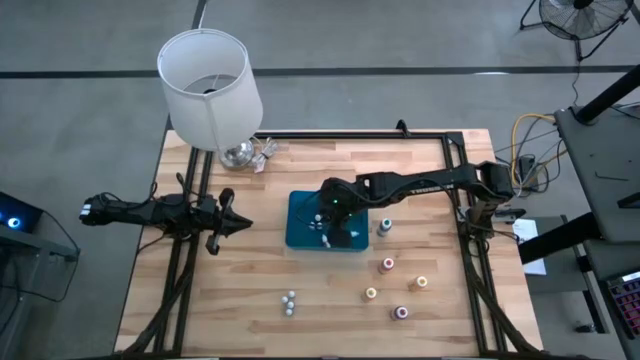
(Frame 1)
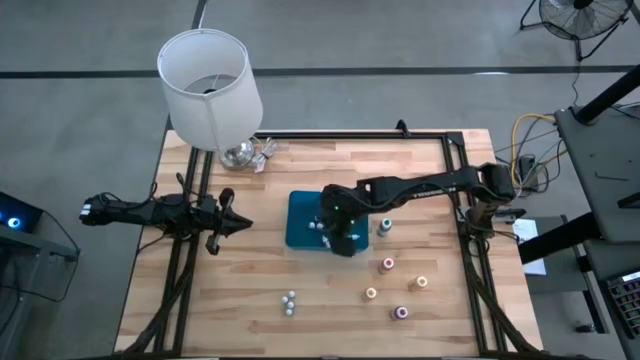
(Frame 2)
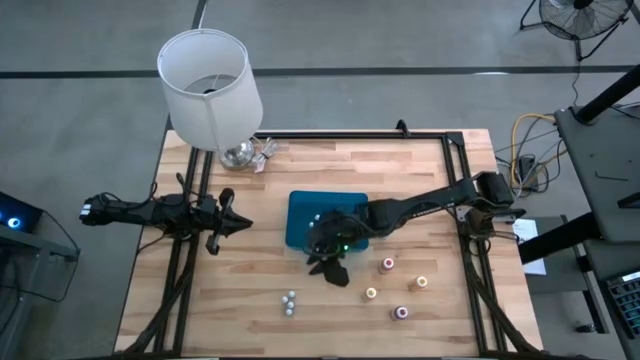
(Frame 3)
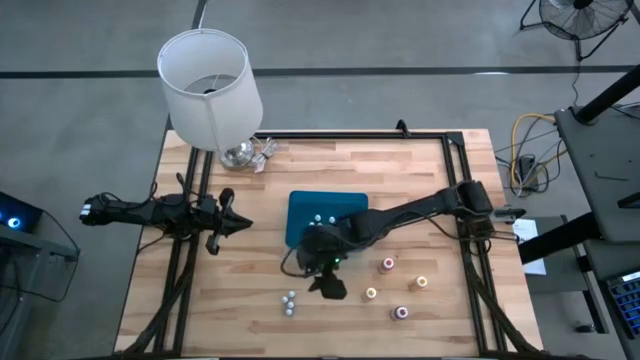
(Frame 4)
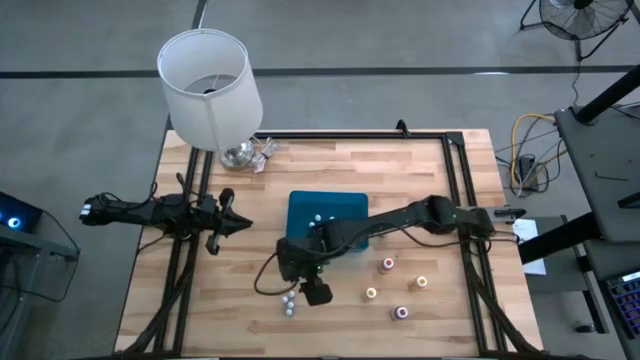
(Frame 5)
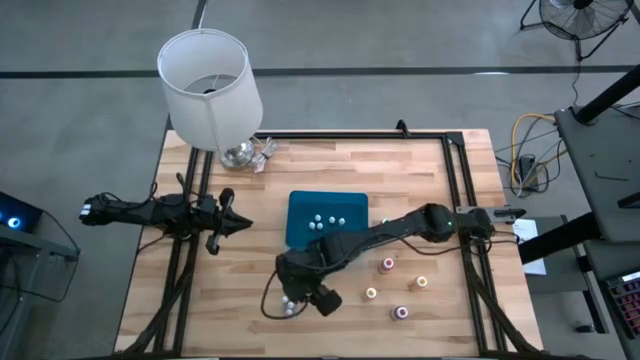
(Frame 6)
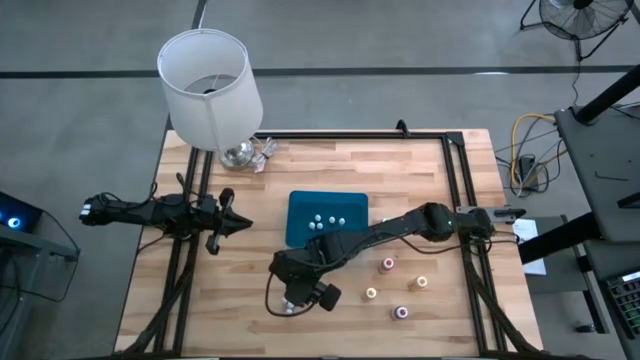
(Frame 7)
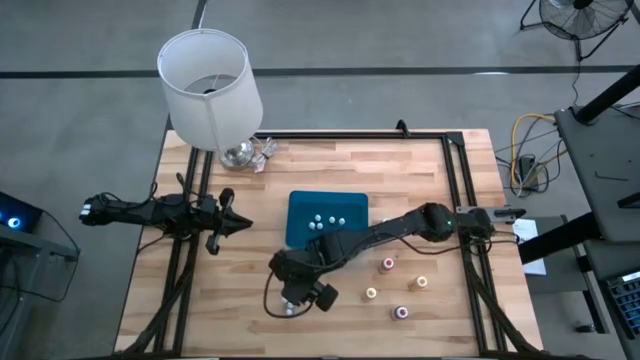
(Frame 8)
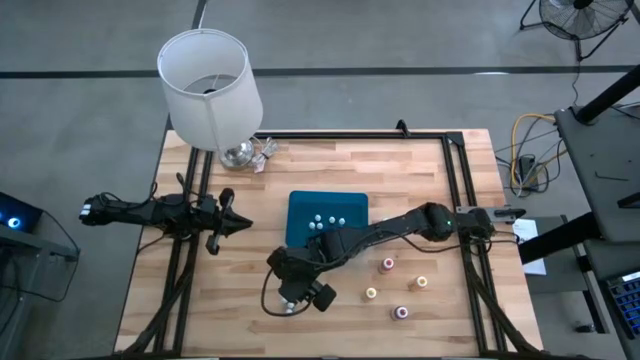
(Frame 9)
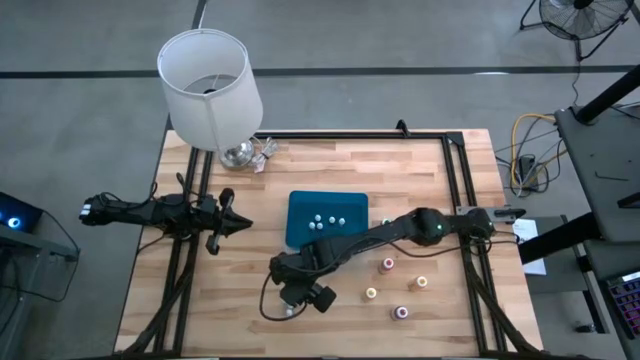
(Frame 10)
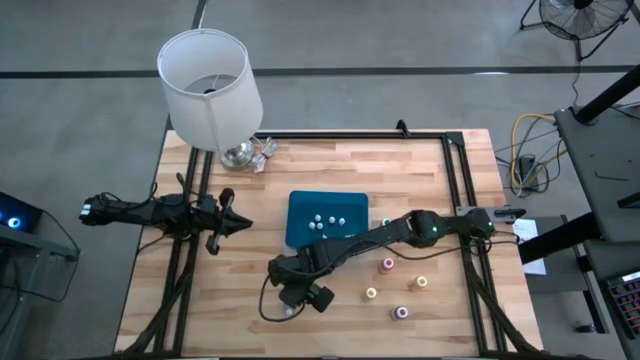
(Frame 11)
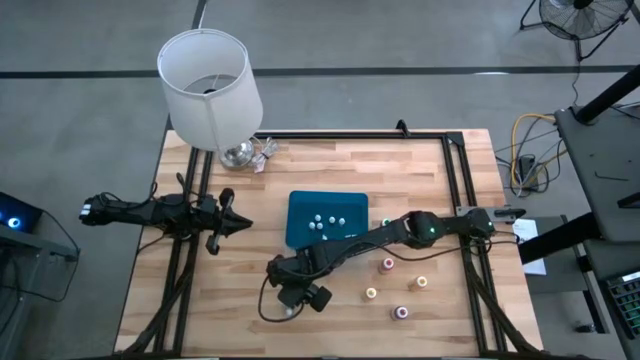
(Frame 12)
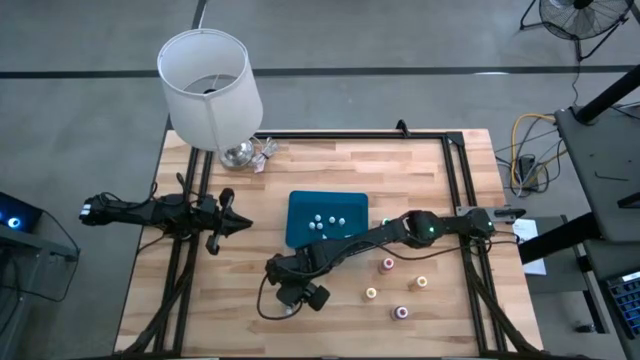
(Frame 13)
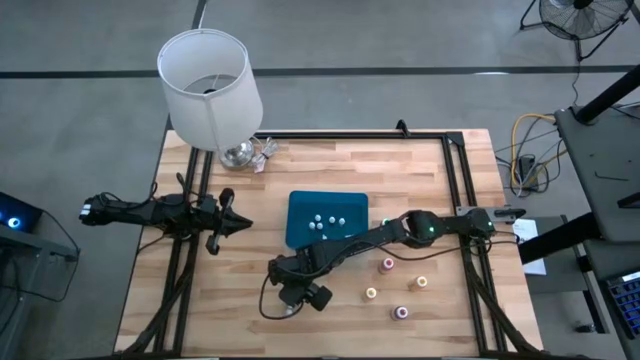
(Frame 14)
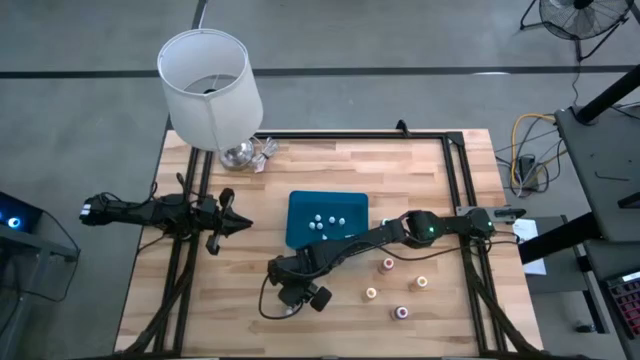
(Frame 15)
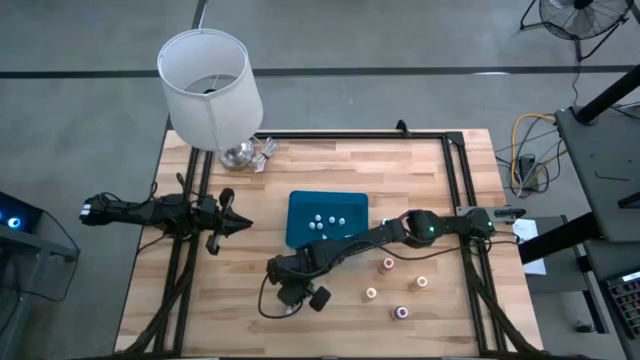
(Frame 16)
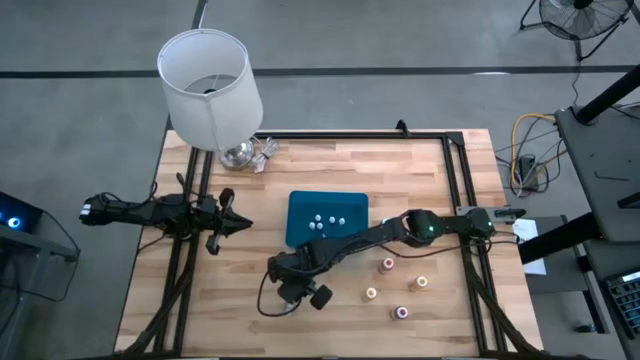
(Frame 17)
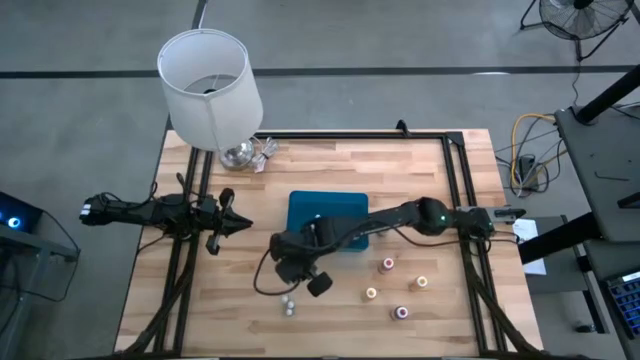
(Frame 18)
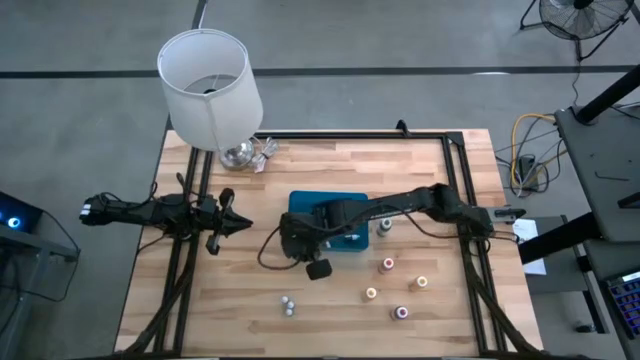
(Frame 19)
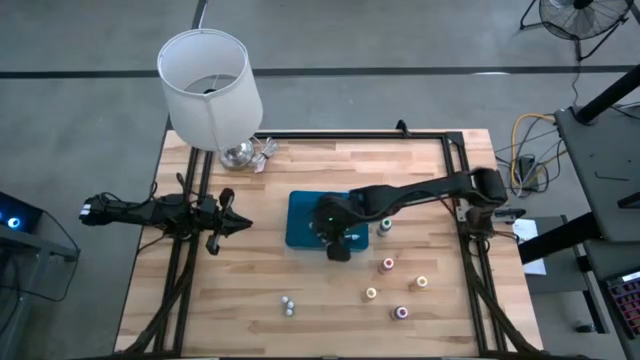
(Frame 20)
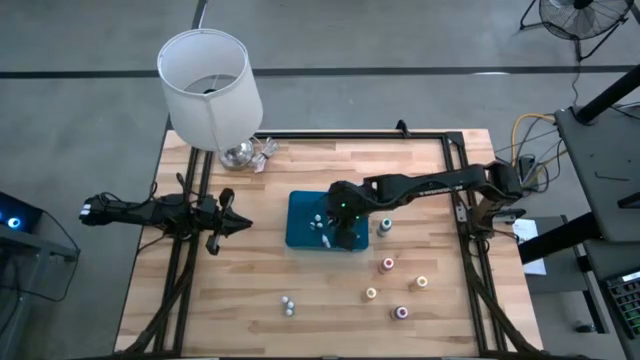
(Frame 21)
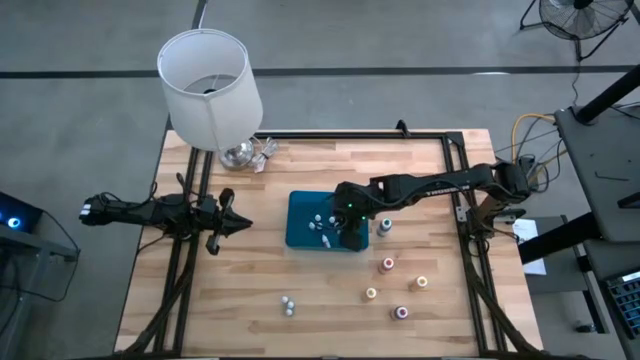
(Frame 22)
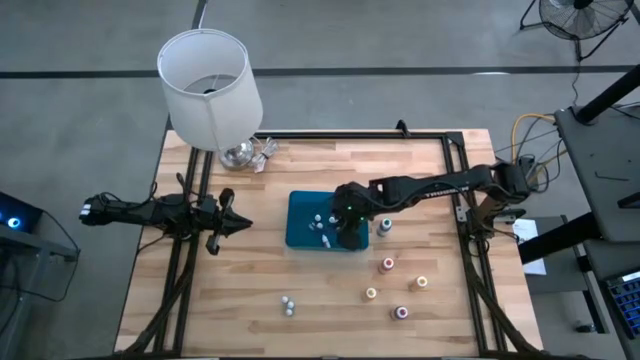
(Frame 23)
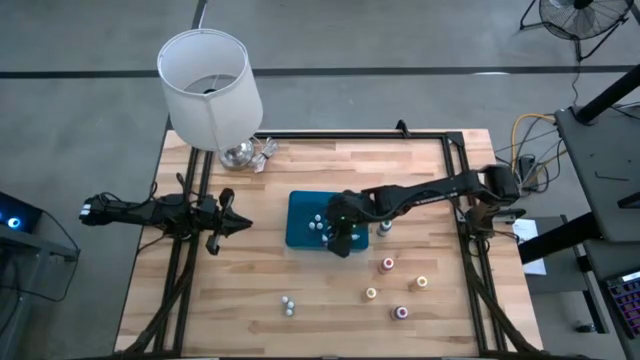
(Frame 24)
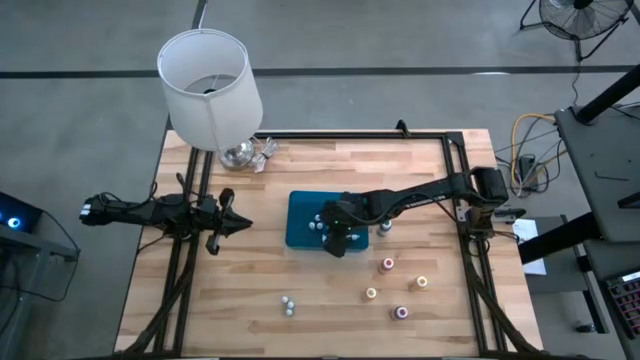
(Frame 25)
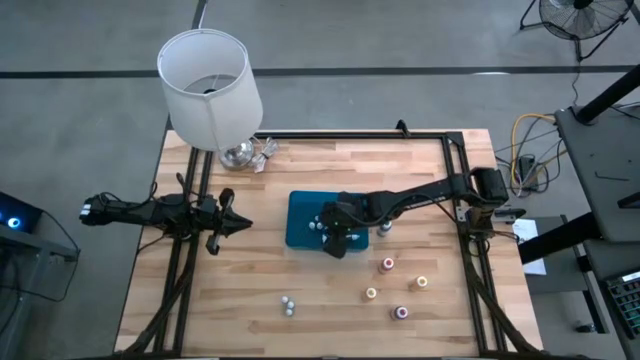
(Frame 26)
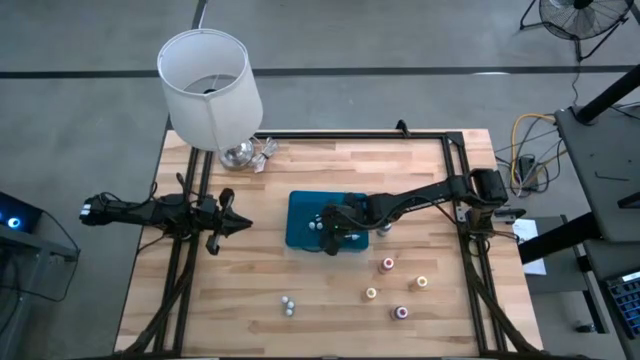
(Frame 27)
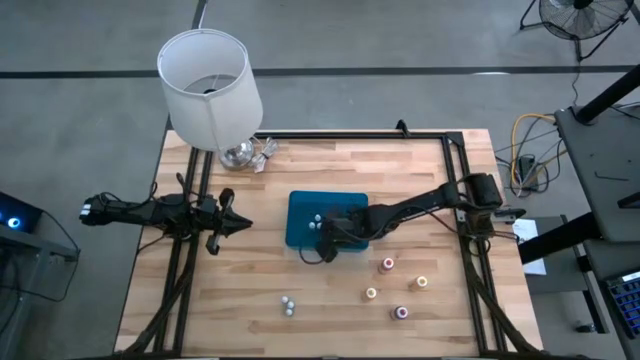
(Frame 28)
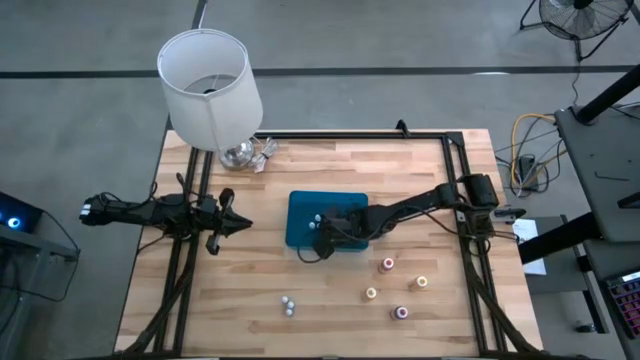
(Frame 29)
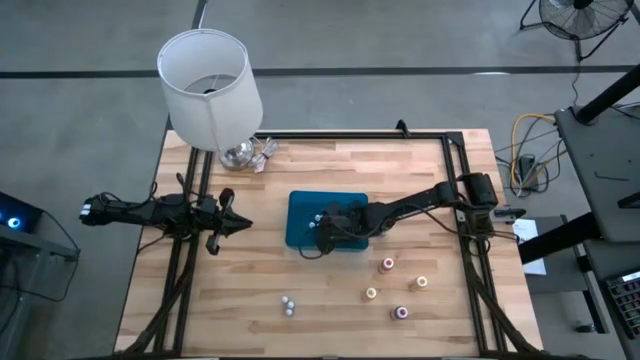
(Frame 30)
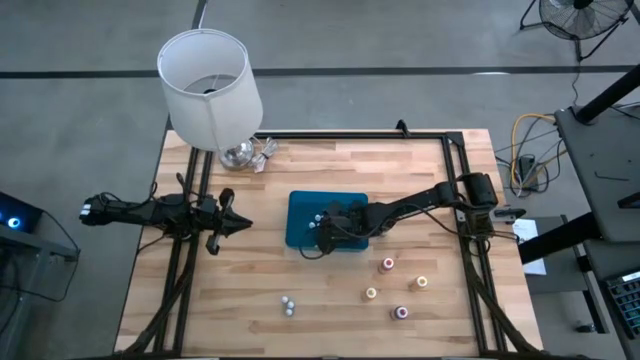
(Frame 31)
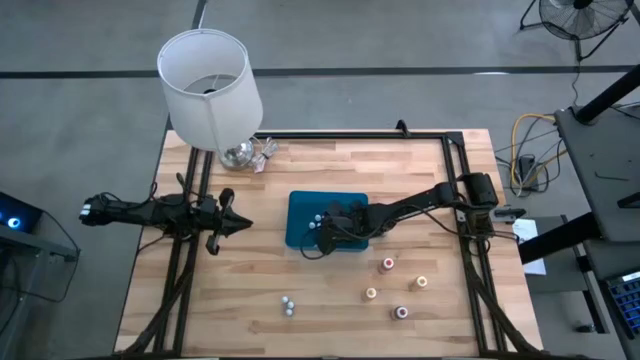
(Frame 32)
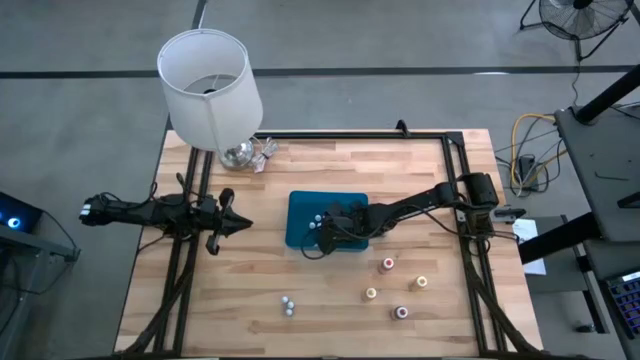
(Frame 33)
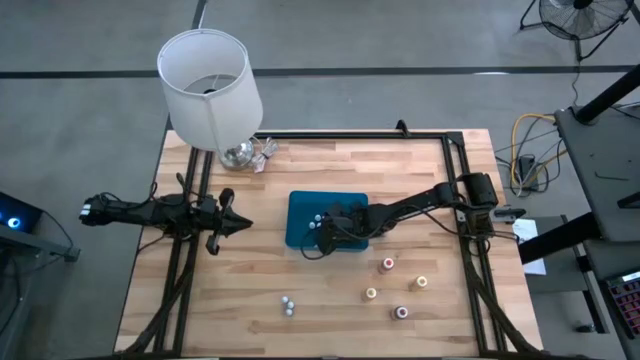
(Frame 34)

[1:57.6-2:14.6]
Task: Pick & Place food coloring
Put the top small black food coloring bottle into the blue bin

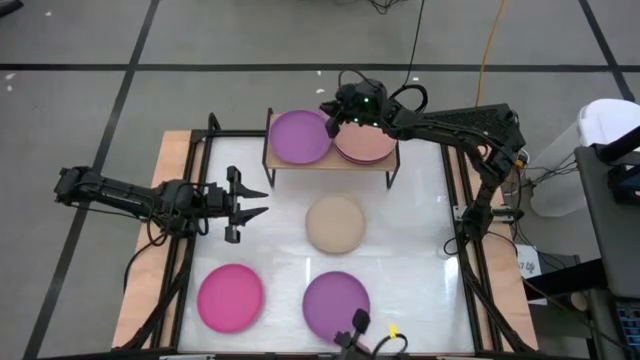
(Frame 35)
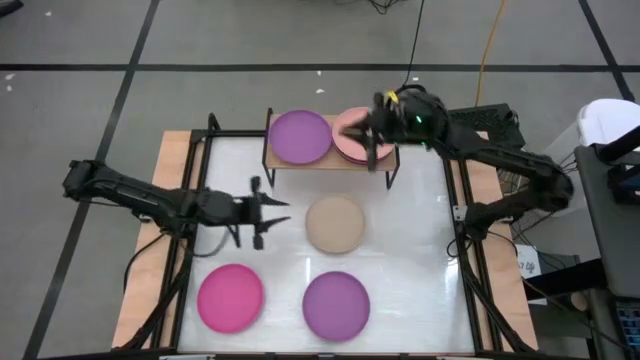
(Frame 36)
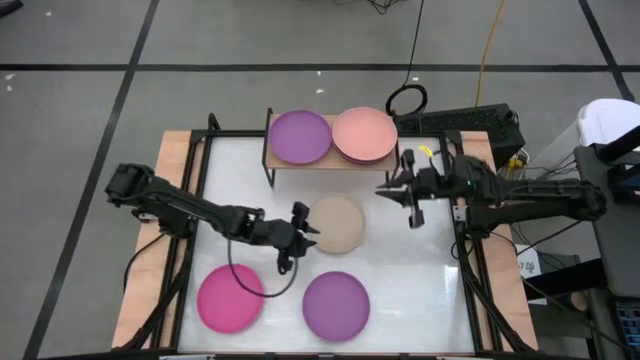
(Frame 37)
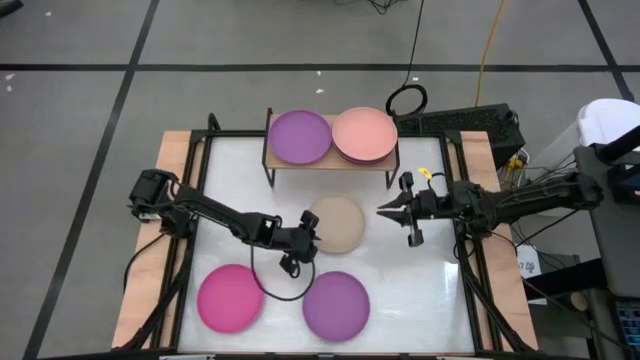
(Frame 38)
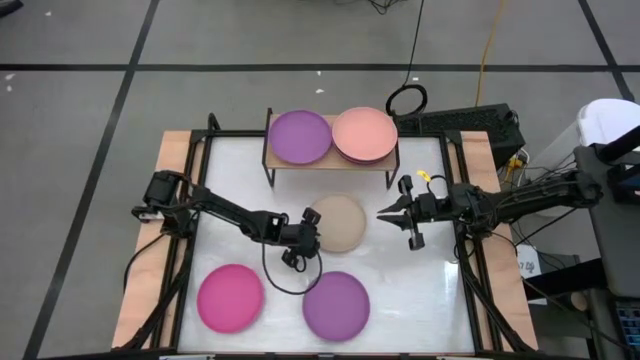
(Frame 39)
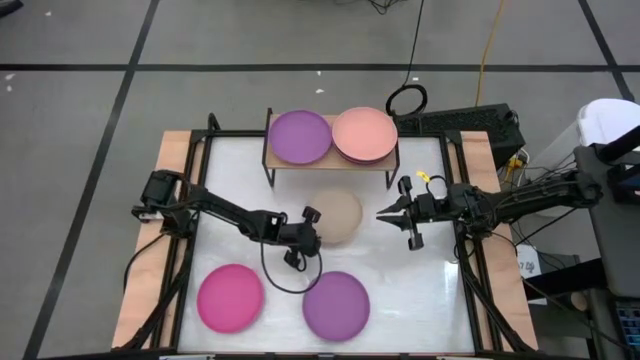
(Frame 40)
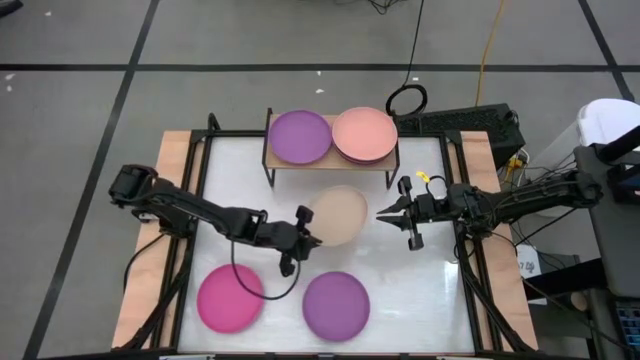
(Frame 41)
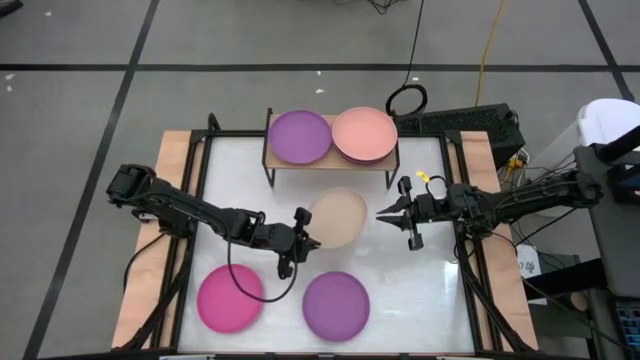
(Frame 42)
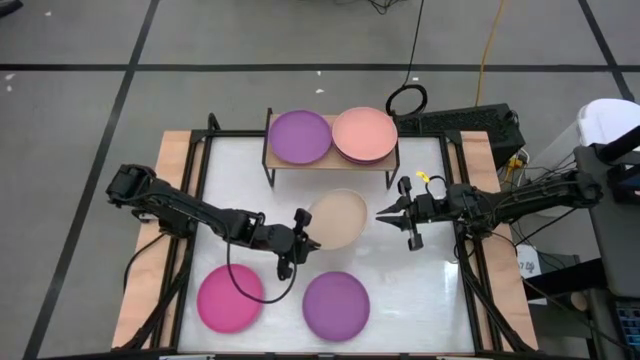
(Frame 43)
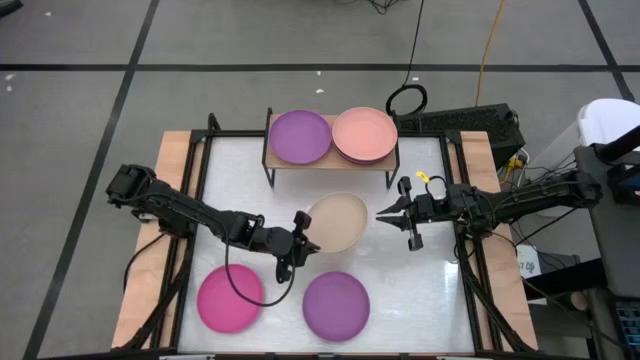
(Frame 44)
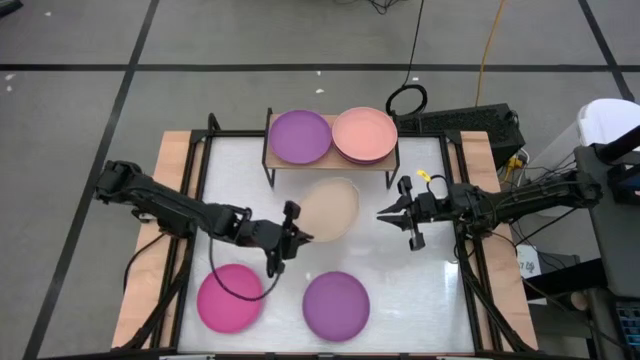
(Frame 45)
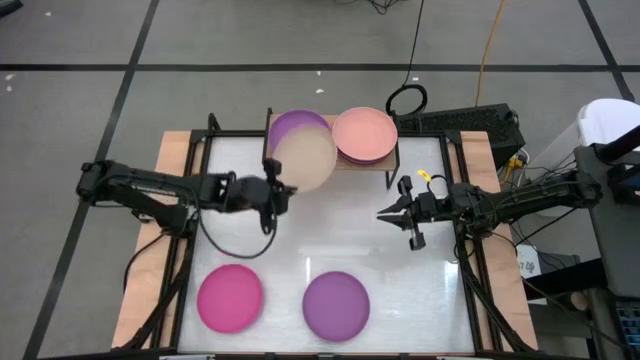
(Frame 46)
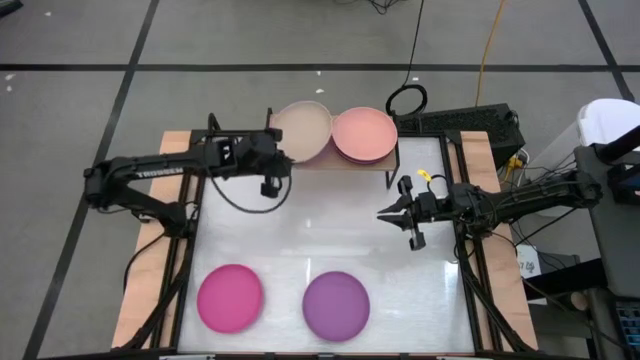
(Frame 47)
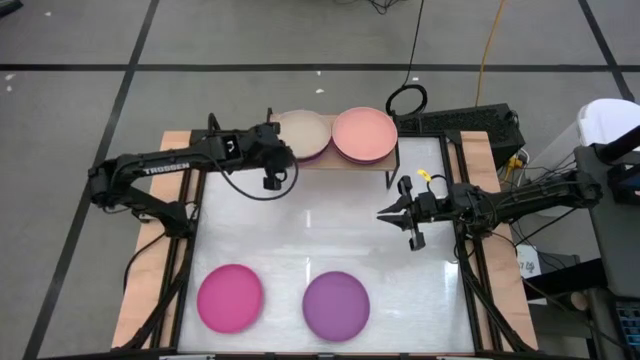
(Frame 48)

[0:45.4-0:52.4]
Task: Place and stack plates onto a shelf
Stack the brown plate on the purple plate on the shelf
